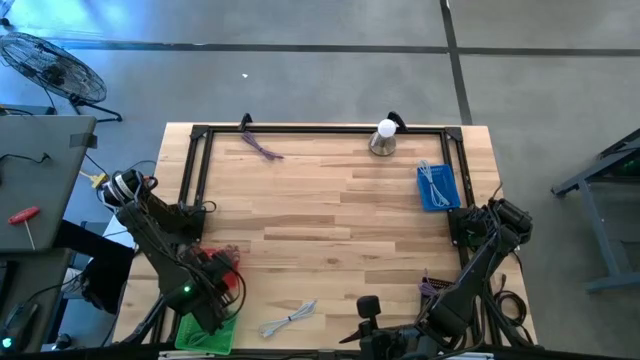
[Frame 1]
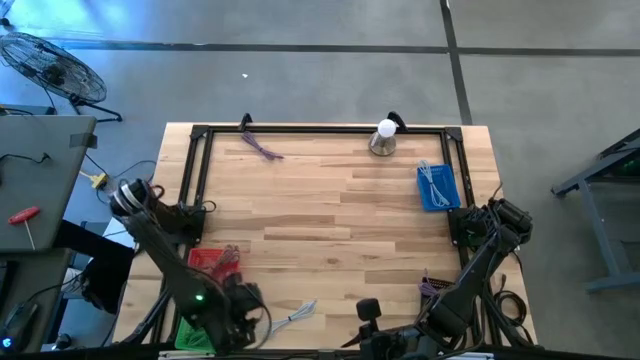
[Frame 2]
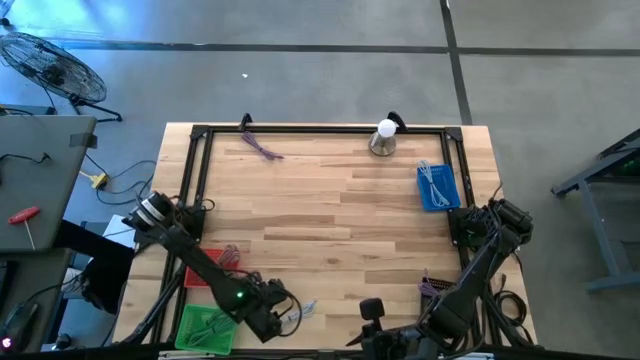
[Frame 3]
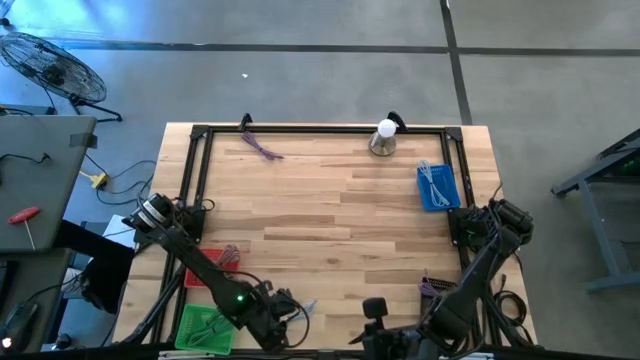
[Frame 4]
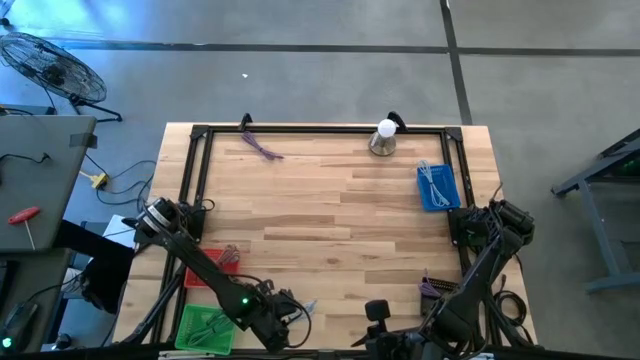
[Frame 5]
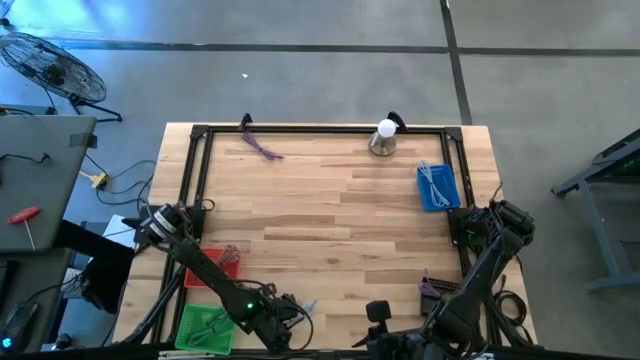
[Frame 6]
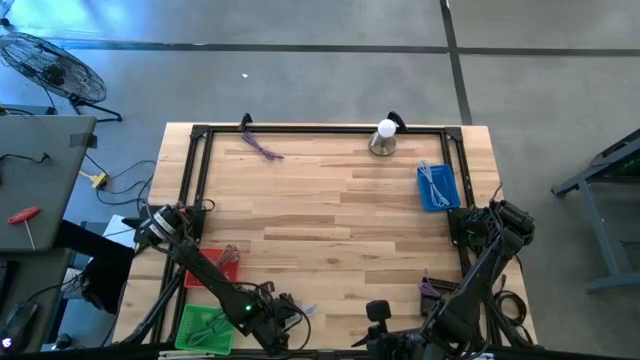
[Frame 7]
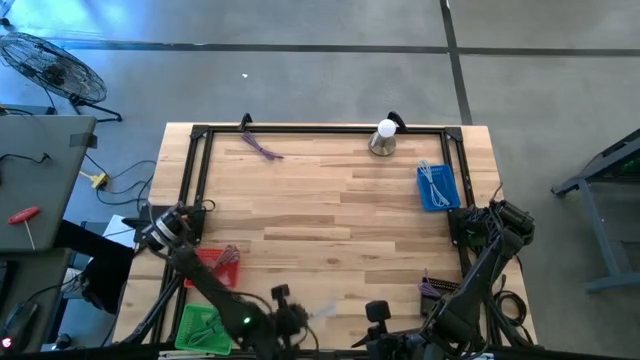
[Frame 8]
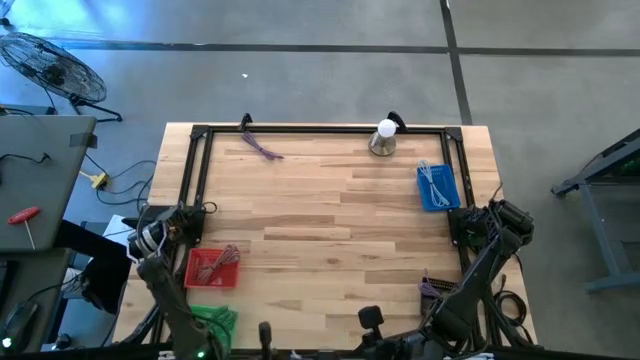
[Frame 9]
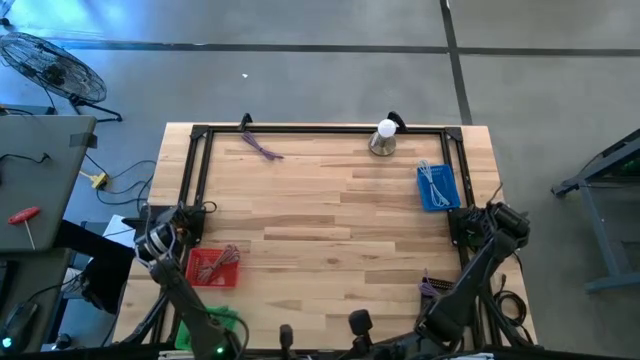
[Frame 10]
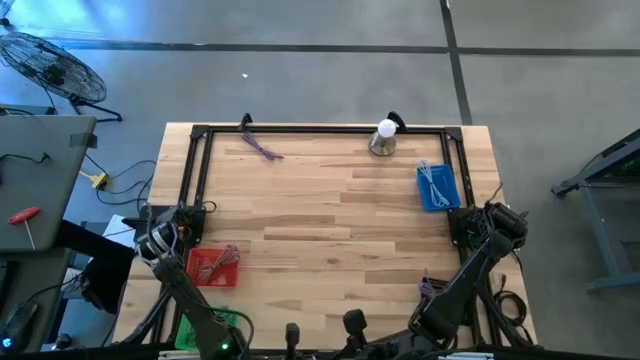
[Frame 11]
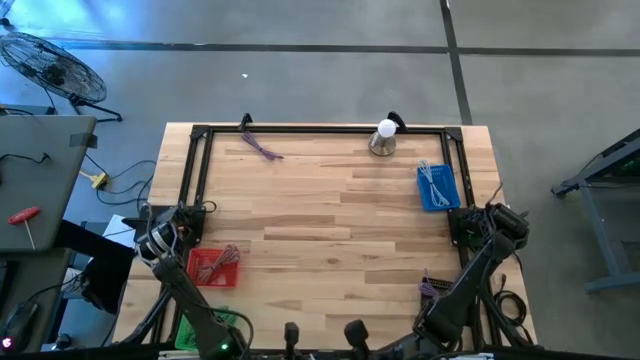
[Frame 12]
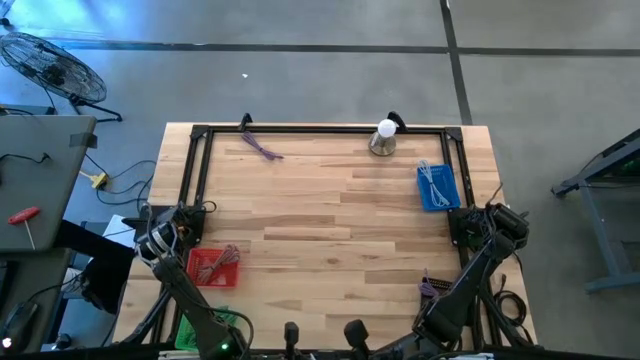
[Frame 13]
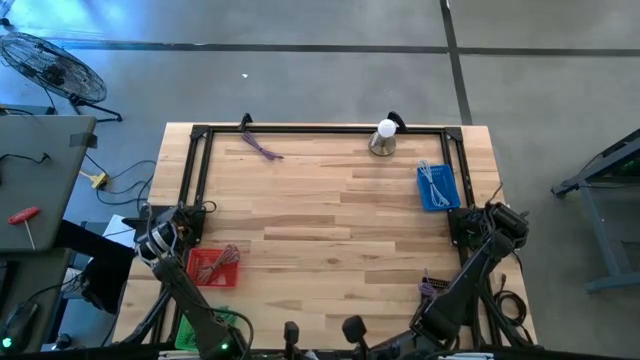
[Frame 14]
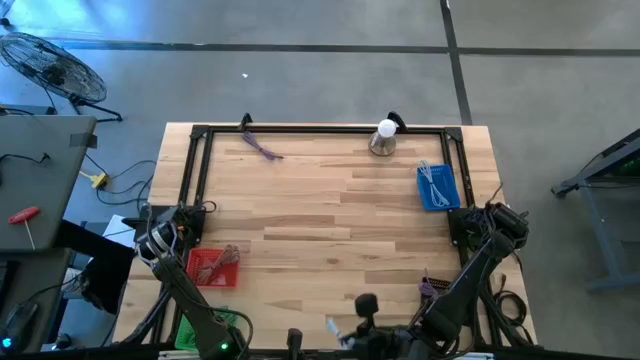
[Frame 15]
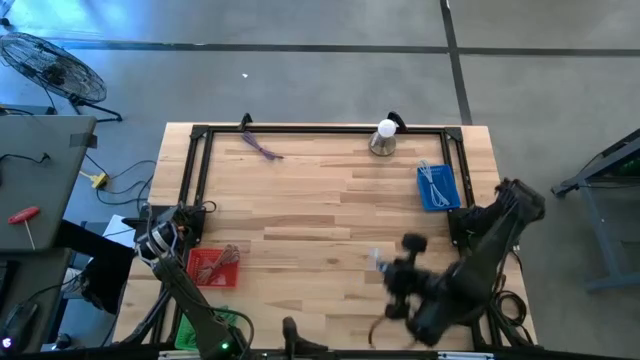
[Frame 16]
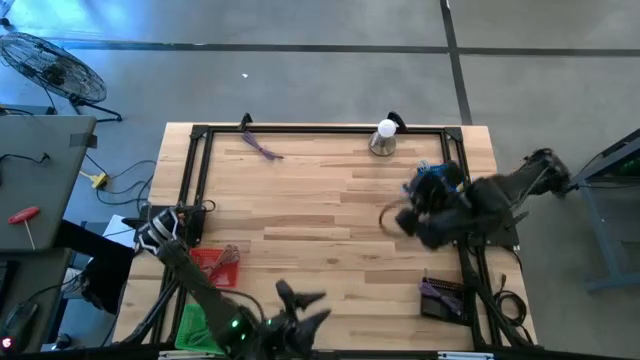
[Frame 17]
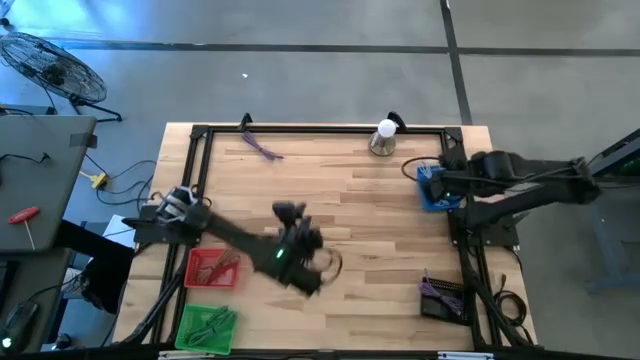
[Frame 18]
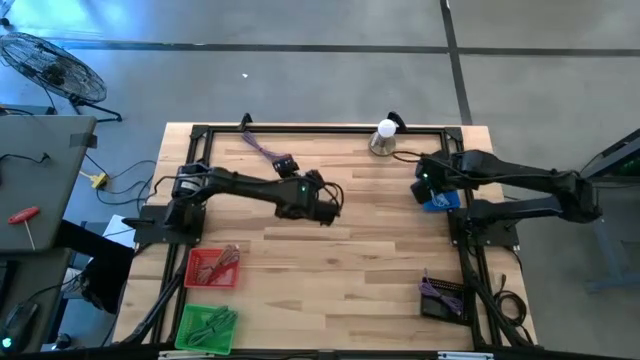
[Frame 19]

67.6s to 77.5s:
Task: Pick & Place USB Port
Put the light blue charger cable into the blue bin

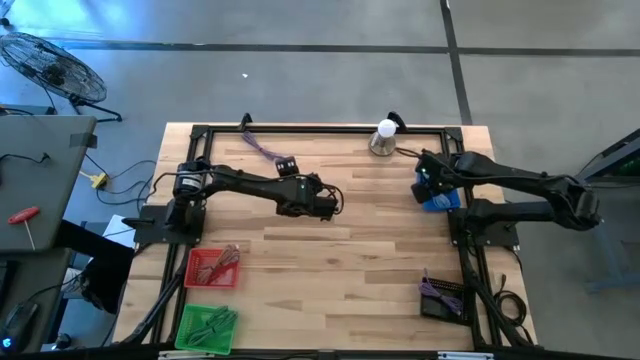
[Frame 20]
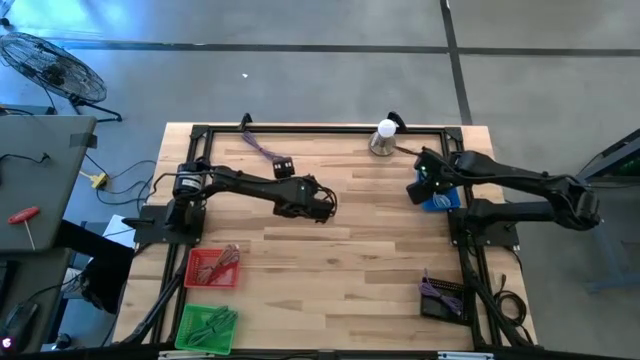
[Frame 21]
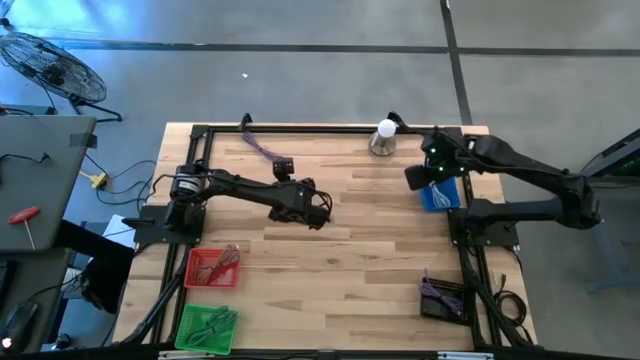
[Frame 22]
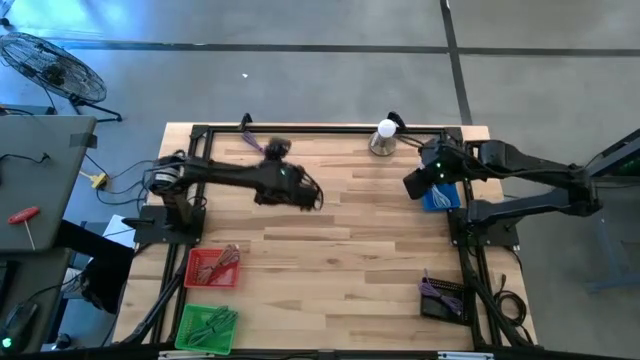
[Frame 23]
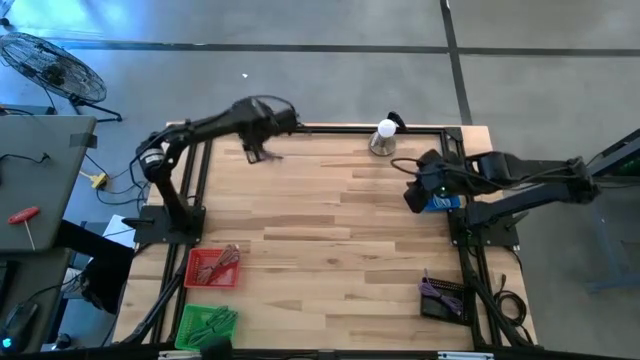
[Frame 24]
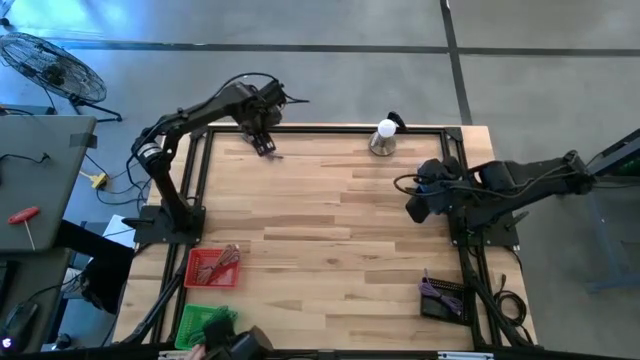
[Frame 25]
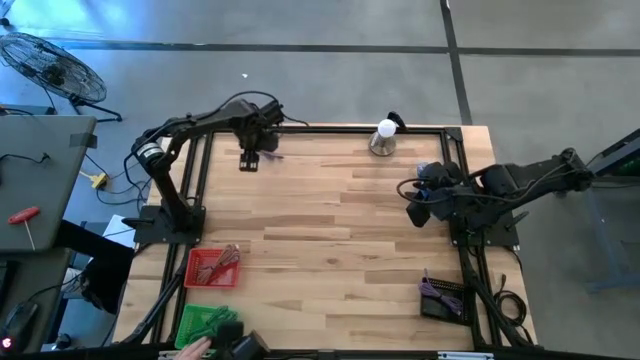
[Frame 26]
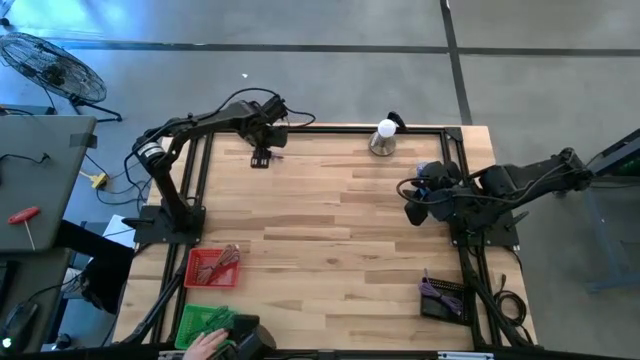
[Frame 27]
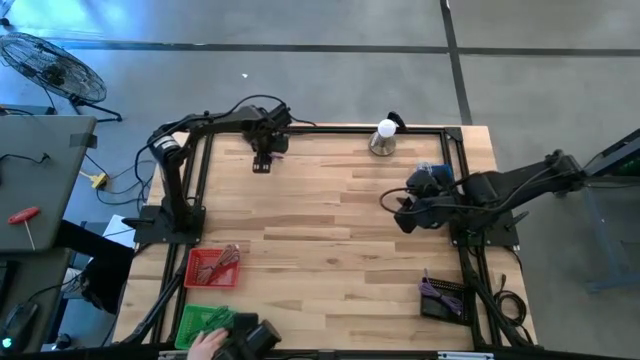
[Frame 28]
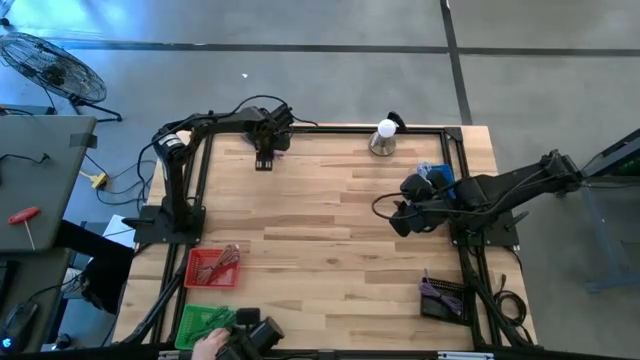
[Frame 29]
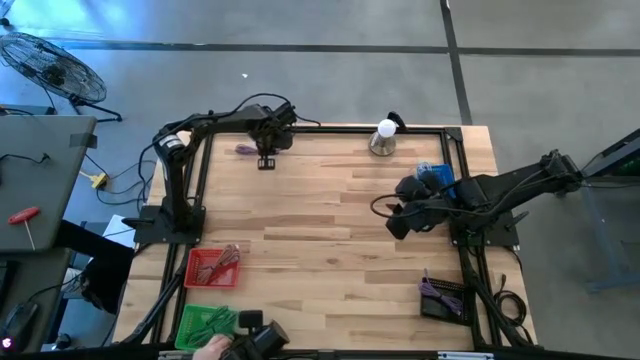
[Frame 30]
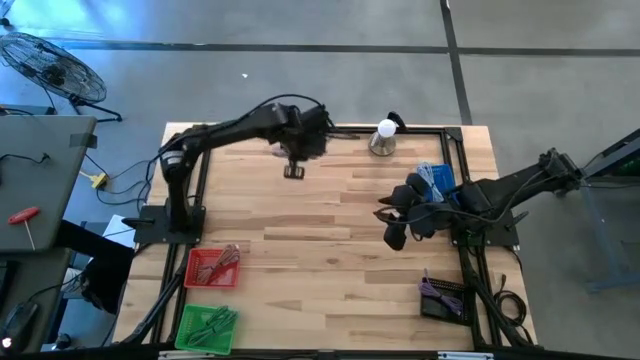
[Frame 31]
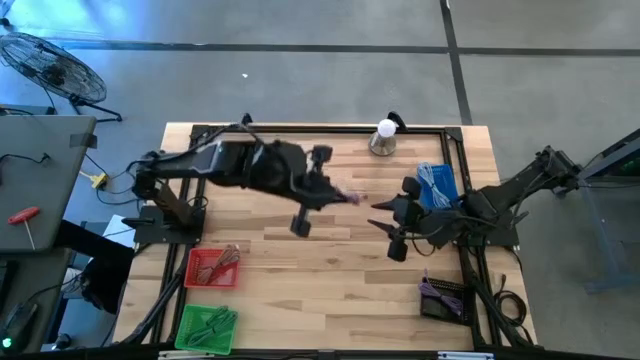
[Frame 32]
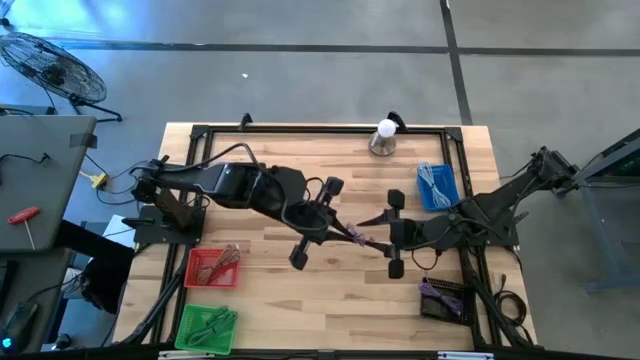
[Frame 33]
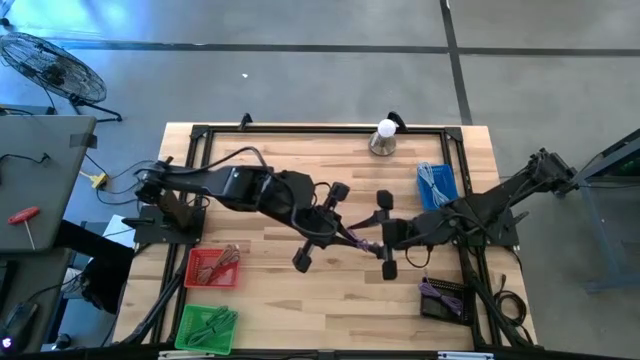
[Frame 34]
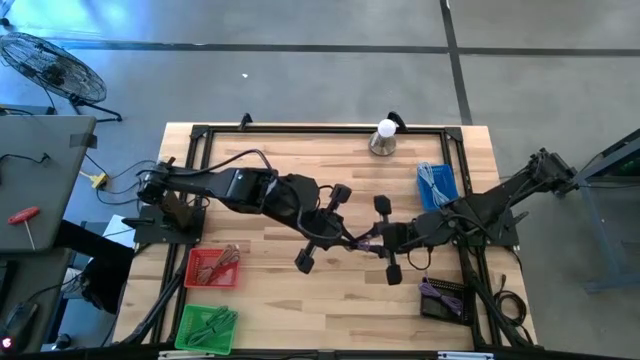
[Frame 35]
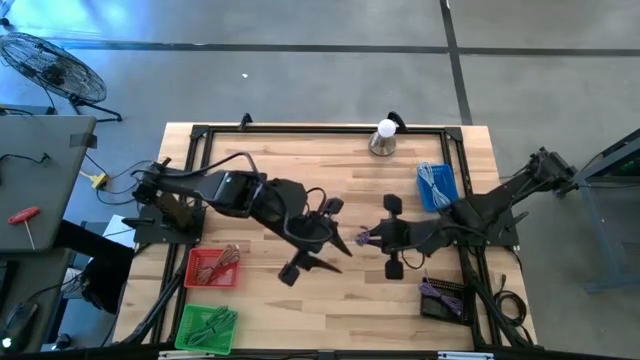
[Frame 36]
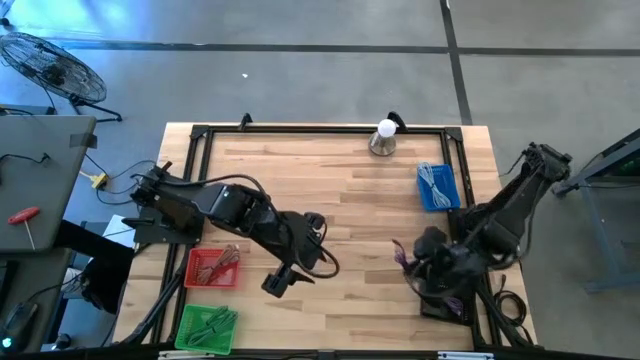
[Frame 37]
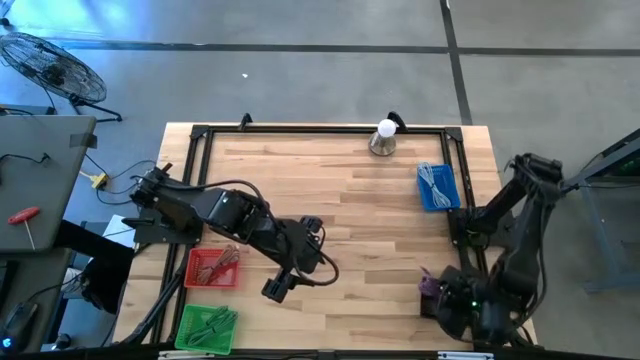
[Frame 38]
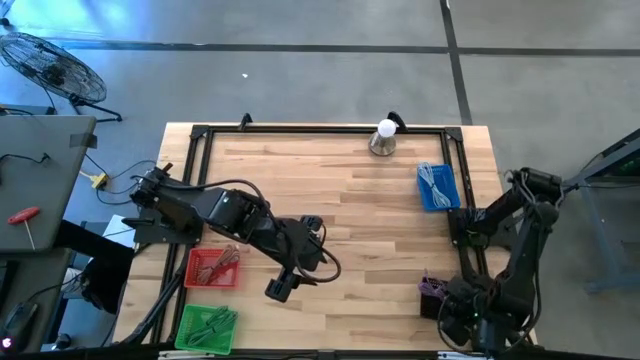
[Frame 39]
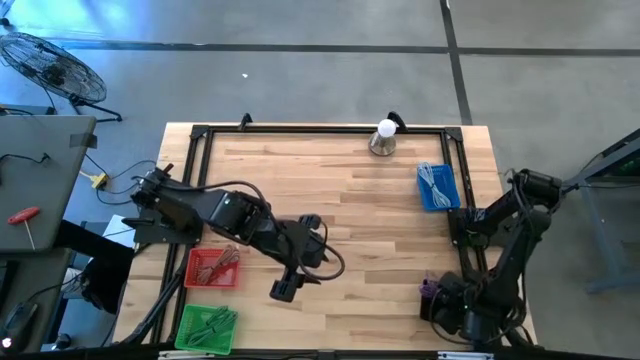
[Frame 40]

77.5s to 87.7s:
Put the purple charger cable into the black bin

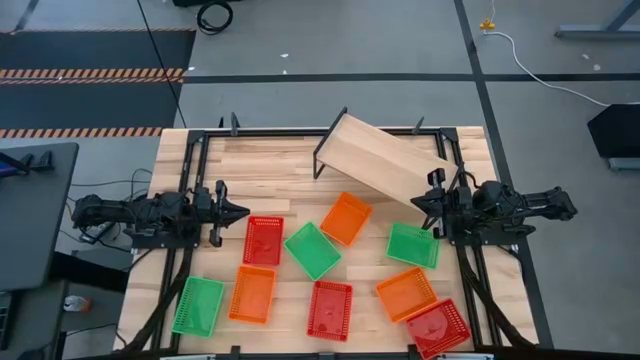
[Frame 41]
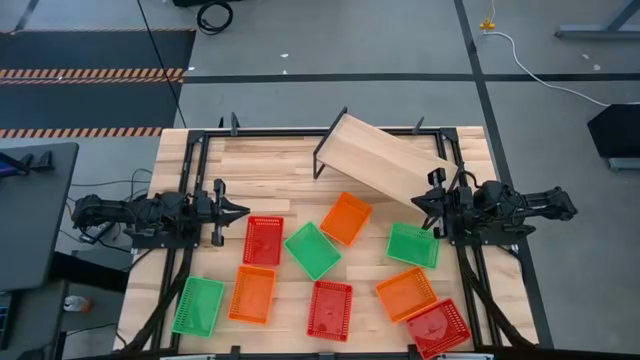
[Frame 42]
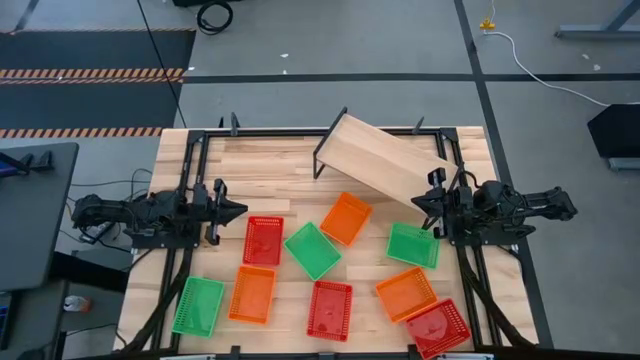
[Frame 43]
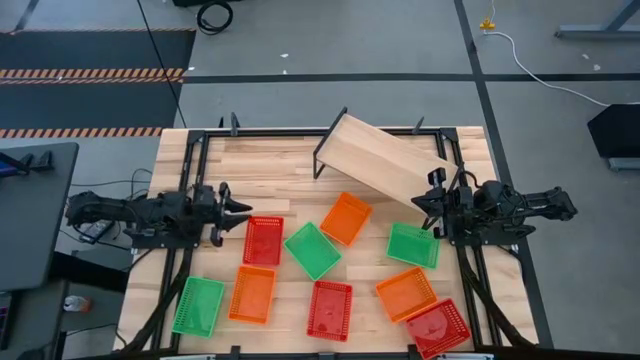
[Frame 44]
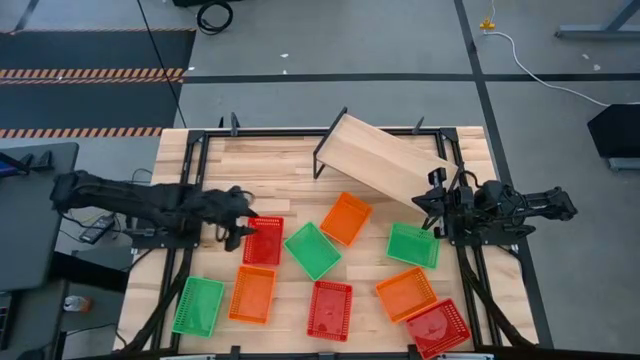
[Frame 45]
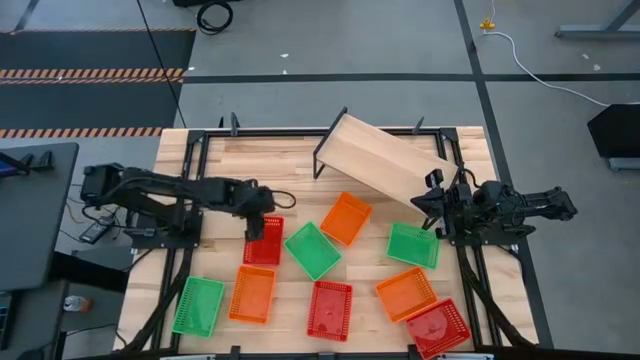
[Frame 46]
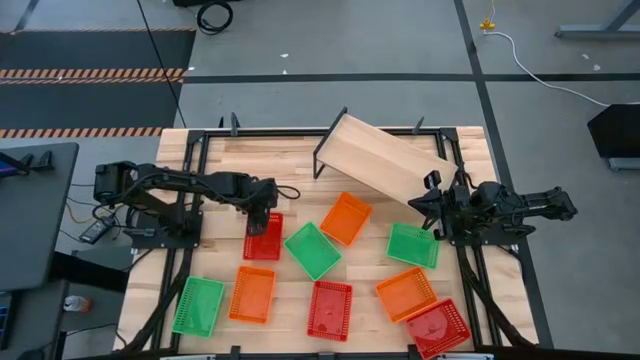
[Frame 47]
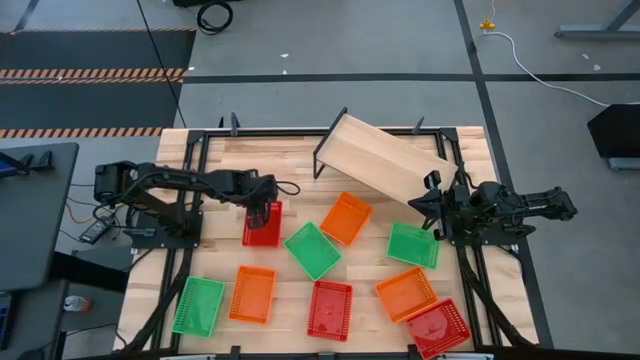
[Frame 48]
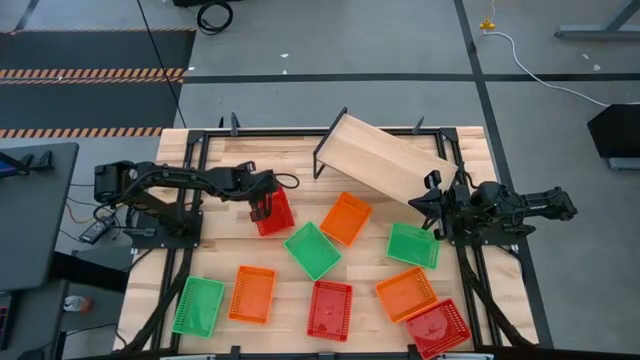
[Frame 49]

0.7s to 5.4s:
Task: Stack baskets on shelf by color
Put the top red bin on the shelf
